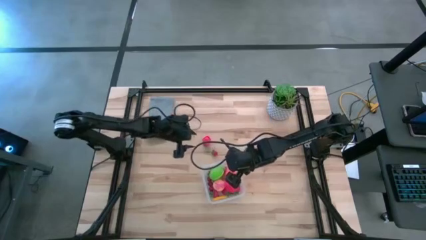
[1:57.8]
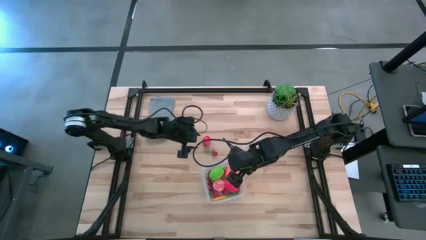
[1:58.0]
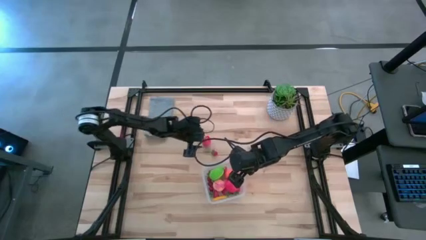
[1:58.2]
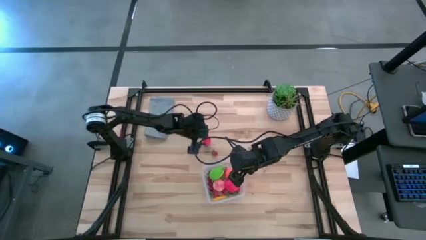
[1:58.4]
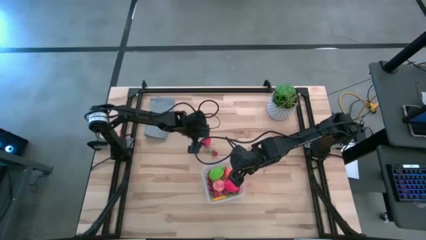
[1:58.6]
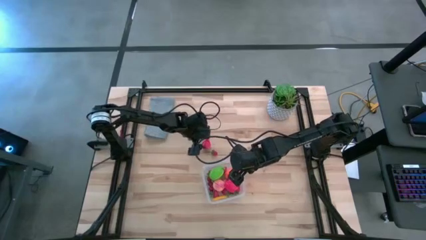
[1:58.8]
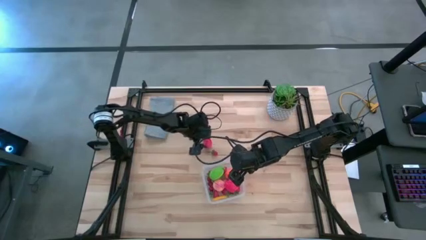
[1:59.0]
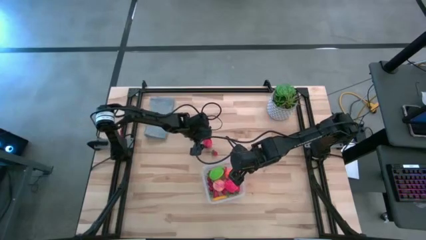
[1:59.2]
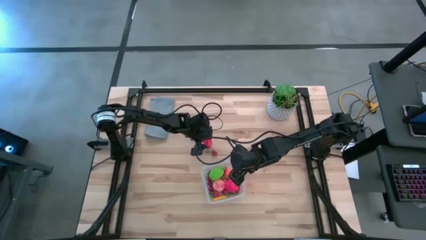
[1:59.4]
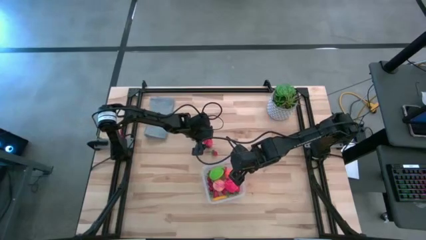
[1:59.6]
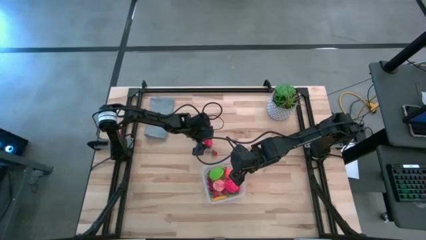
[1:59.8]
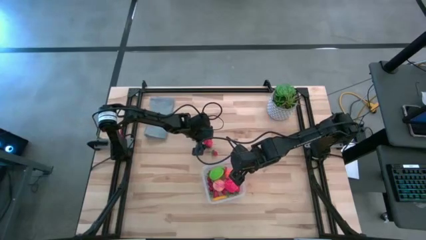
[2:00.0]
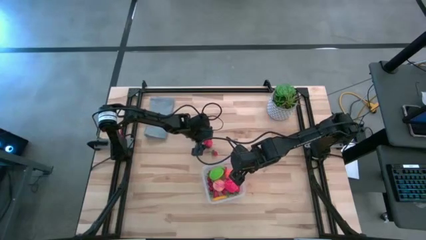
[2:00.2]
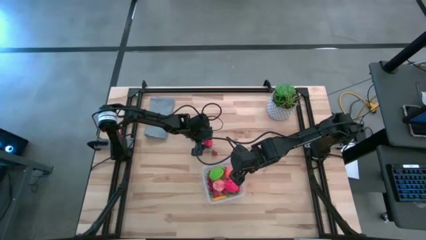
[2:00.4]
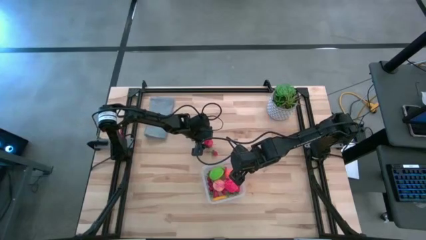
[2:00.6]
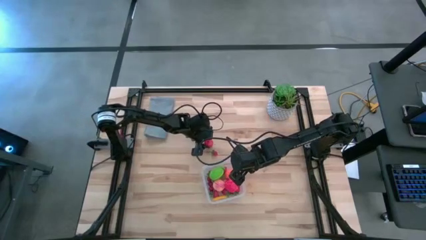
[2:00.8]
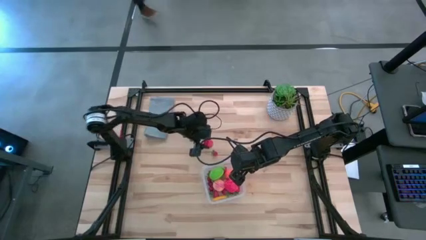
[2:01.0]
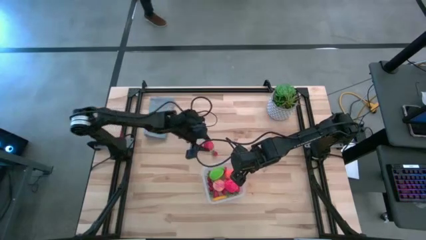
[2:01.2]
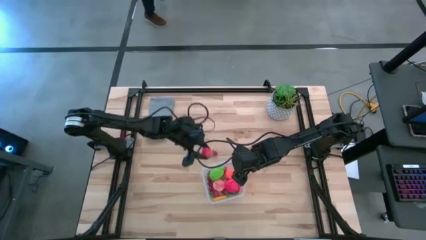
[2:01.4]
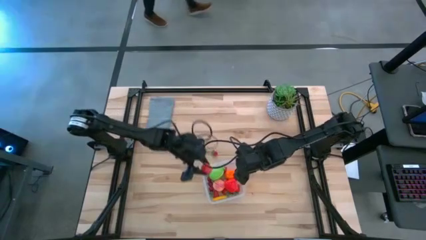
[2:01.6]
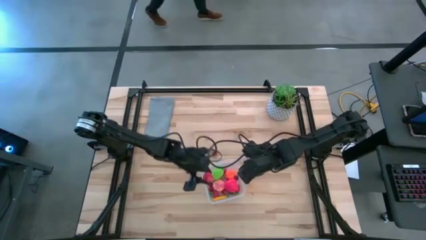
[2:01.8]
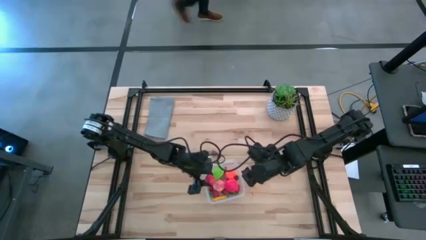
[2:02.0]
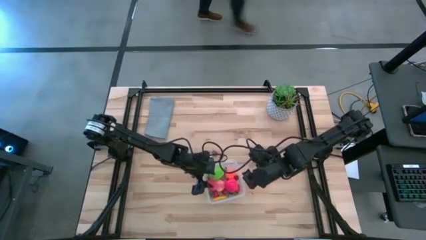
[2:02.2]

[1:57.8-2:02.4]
Task: Pick and placing Produce into tupperware
Put the red strawberry into the transparent bin

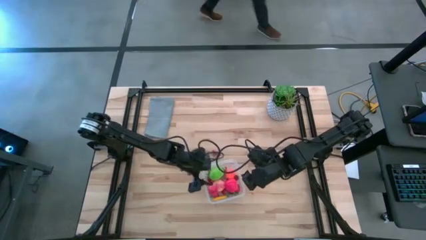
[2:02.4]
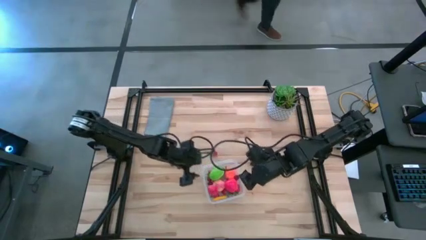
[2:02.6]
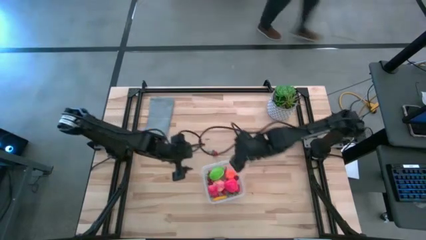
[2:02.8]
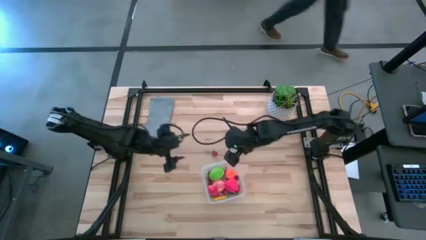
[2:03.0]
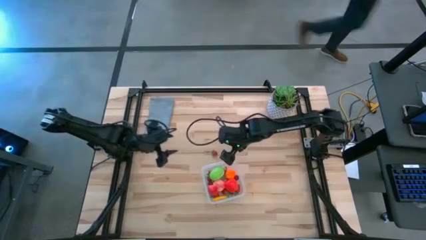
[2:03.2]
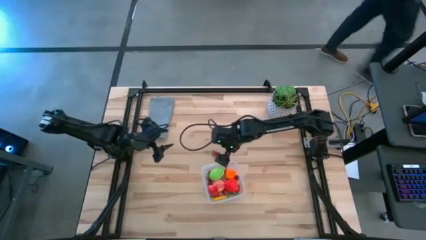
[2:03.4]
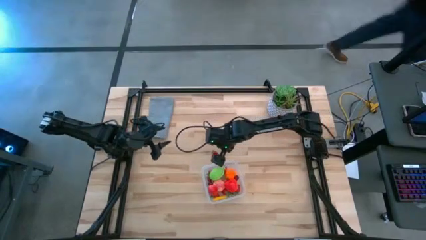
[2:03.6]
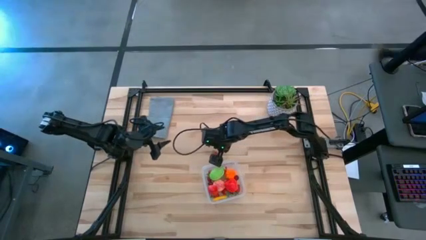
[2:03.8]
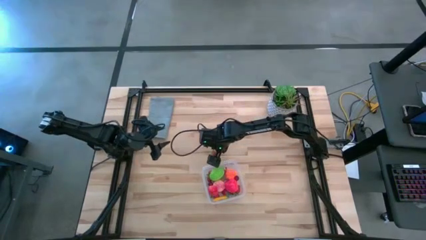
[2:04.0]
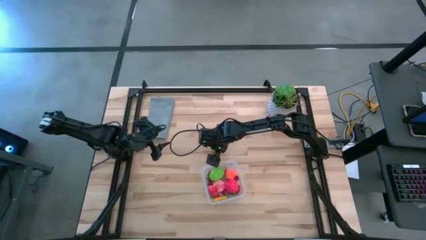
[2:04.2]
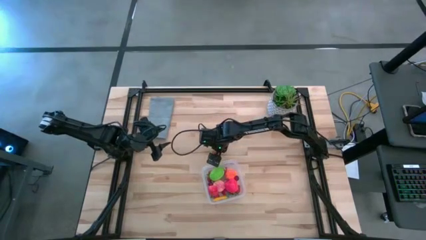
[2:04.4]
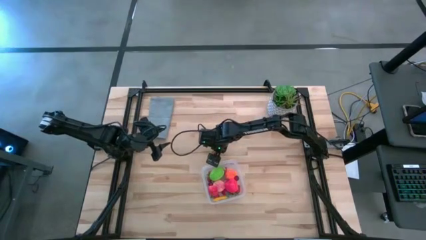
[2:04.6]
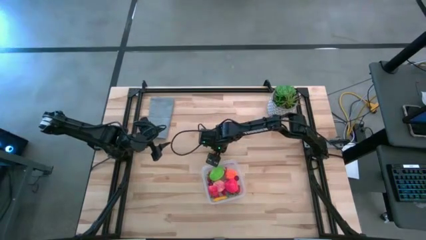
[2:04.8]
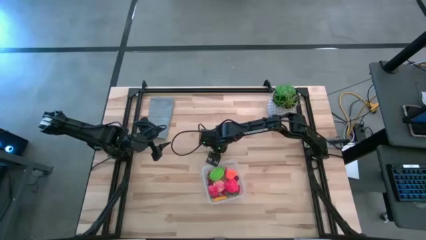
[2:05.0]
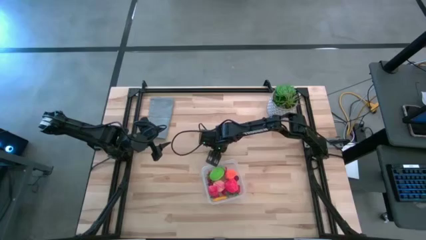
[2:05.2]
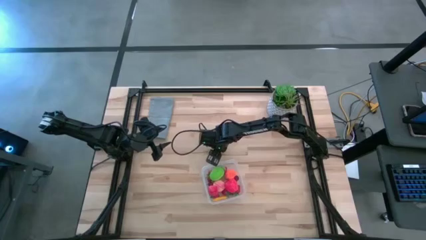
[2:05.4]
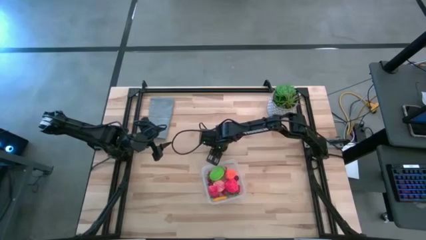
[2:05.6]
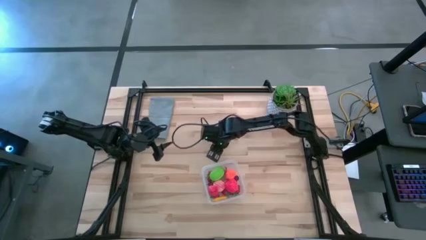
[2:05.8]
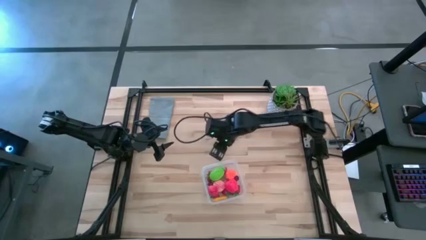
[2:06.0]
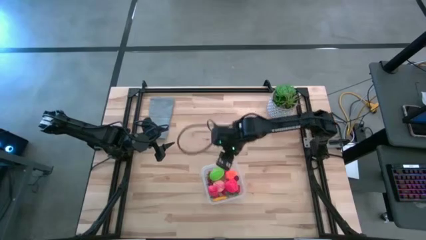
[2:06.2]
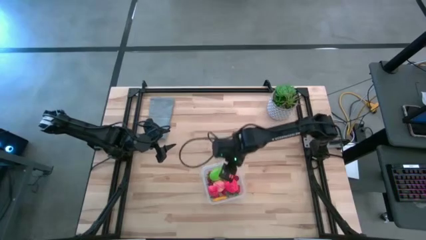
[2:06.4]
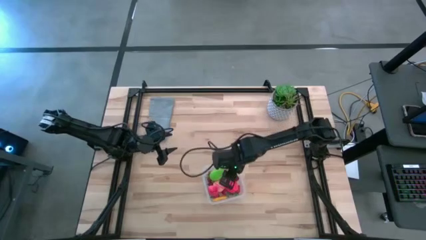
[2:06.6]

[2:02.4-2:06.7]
Put the red strawberry into the transparent bin

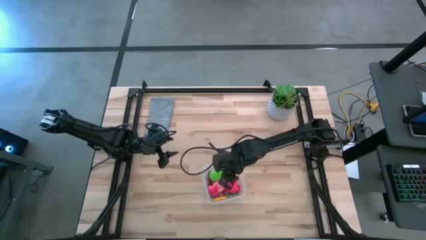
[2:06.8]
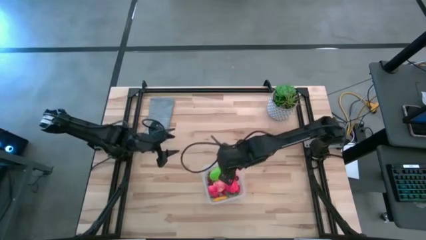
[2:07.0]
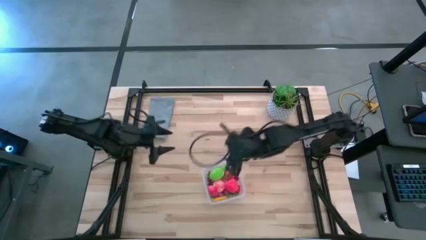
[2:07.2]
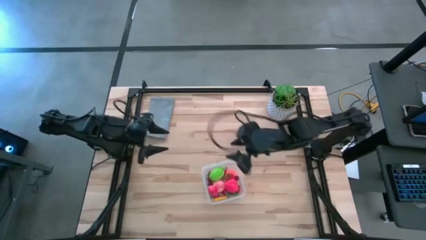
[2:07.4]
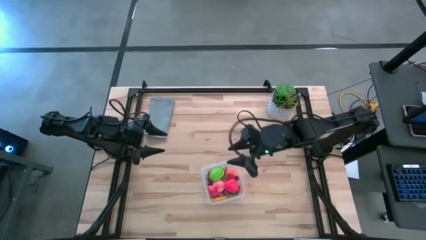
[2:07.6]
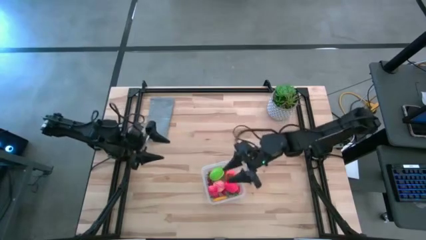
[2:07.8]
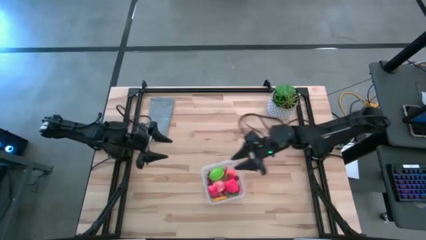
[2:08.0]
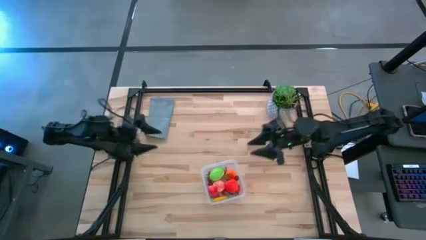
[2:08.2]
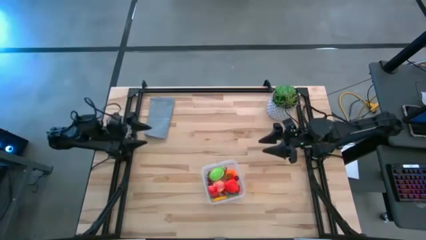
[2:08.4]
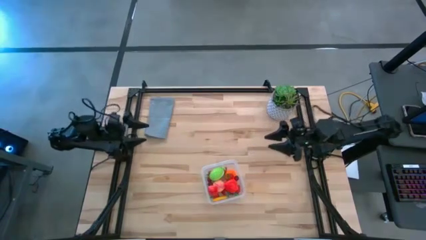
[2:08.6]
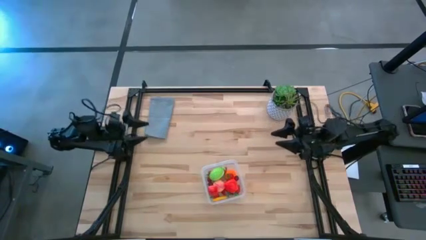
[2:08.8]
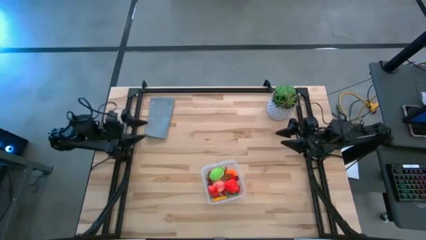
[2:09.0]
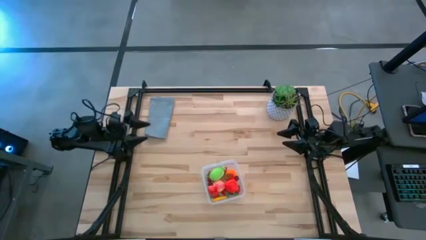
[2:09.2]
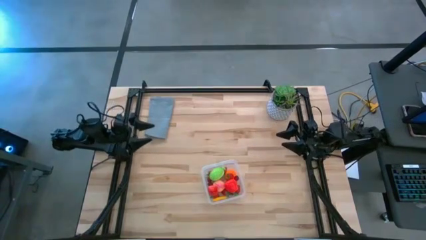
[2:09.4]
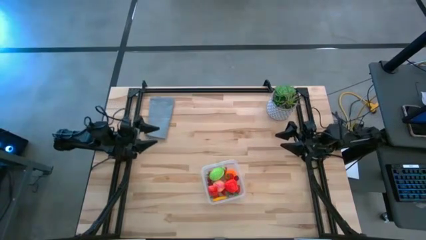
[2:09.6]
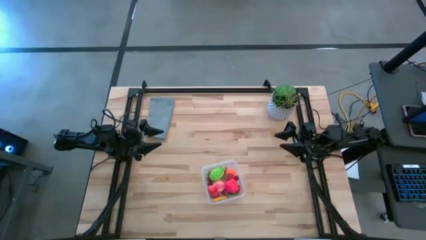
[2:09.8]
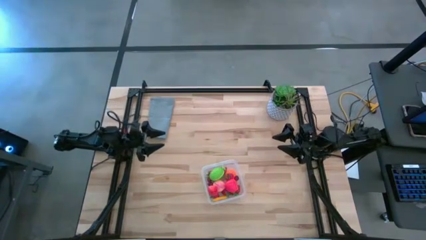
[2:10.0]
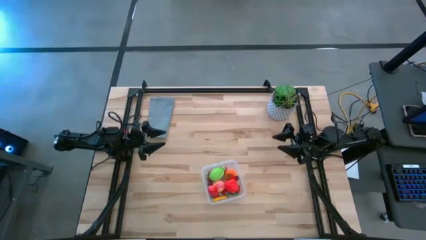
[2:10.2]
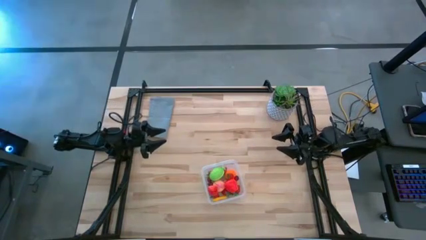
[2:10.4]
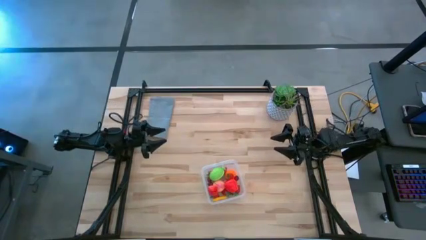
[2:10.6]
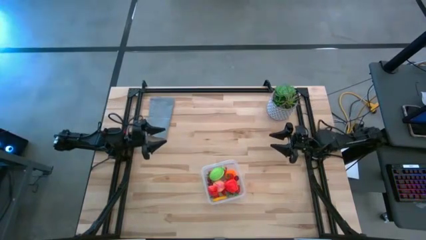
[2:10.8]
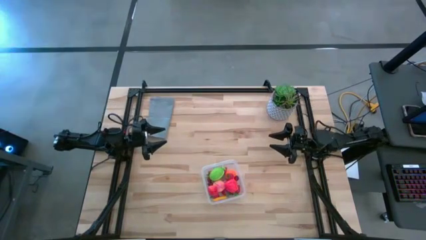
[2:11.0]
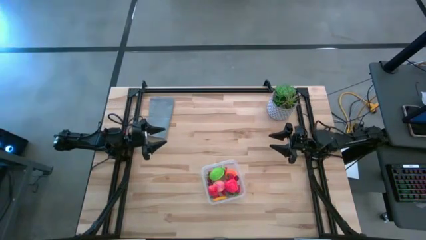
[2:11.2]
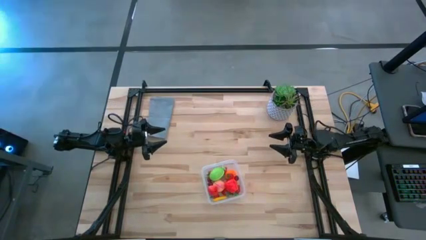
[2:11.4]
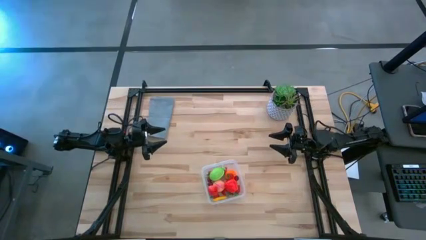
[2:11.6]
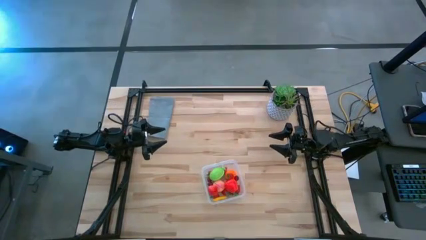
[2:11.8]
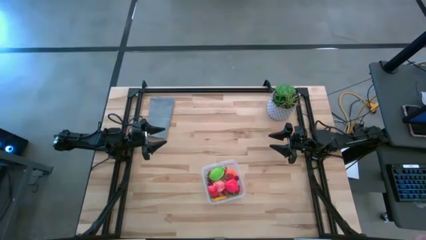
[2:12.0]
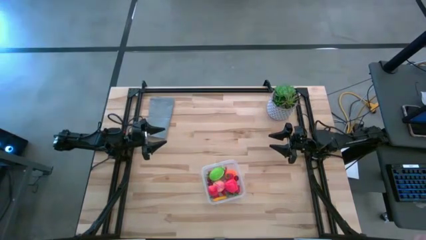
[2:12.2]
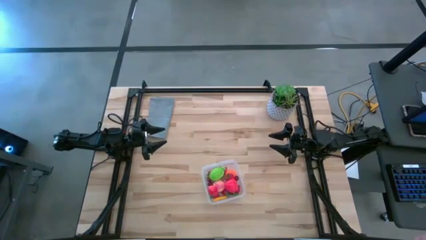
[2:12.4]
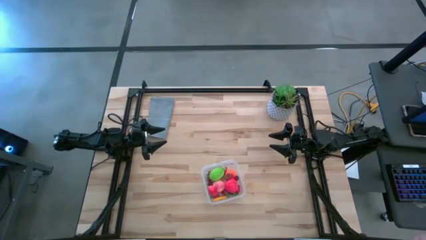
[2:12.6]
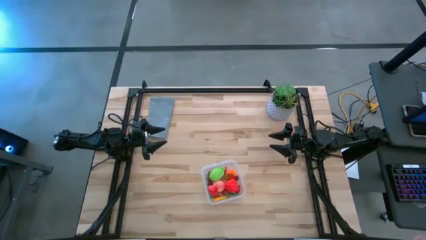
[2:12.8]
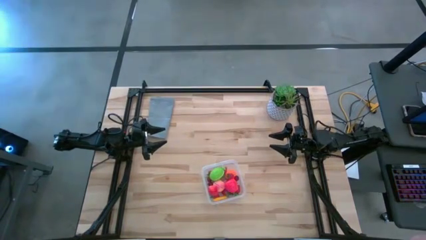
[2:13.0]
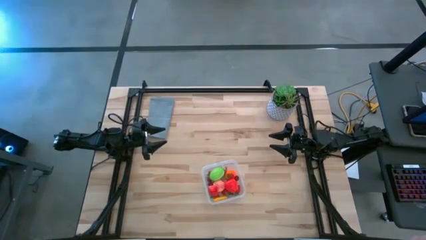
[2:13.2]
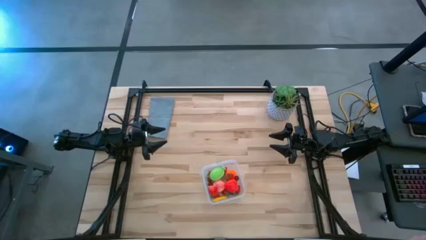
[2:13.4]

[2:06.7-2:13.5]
Return to Home Position

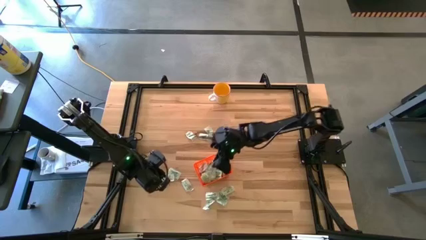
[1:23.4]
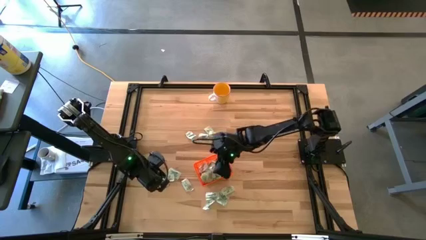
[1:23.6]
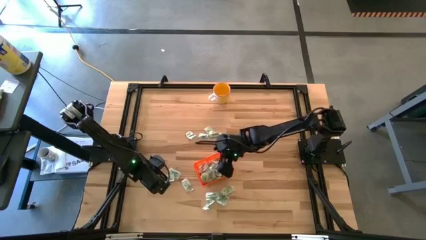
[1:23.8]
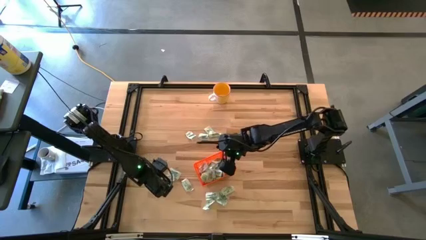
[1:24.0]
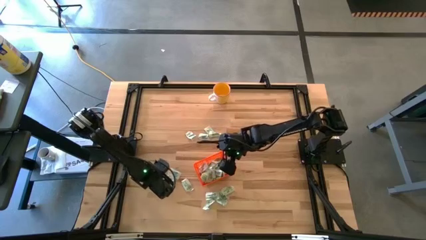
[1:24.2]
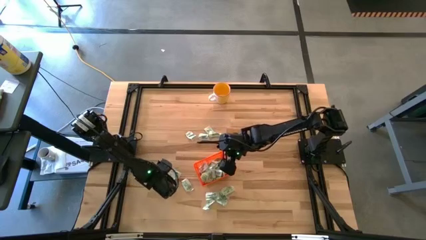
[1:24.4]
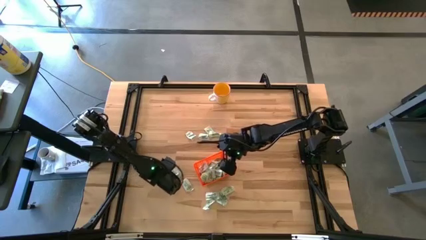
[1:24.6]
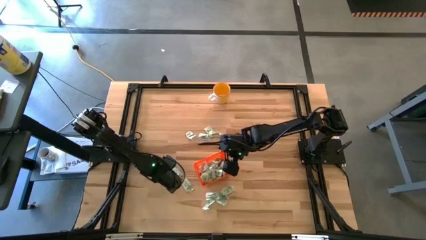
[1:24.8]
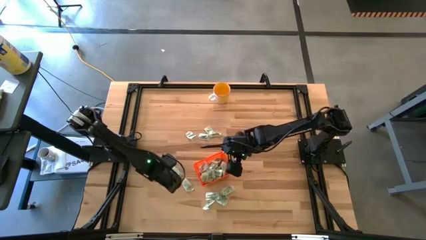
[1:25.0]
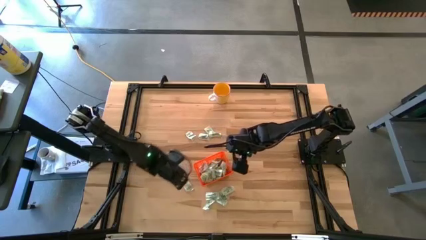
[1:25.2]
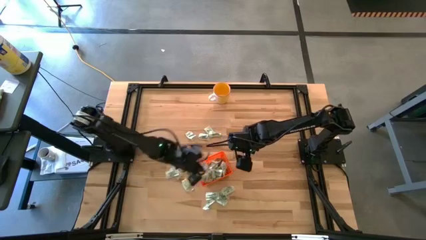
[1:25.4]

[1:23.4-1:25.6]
Task: Pick and place Stevia / Truvia into bins
Put the stevia packet into the bin
